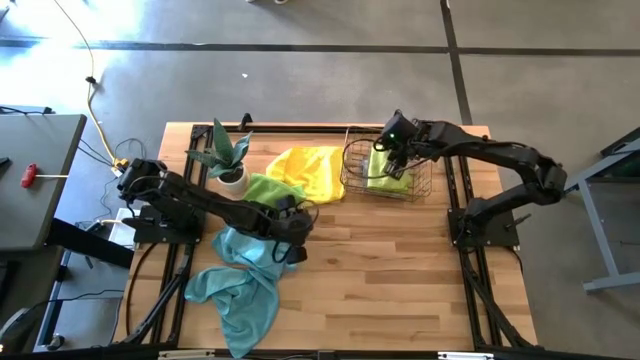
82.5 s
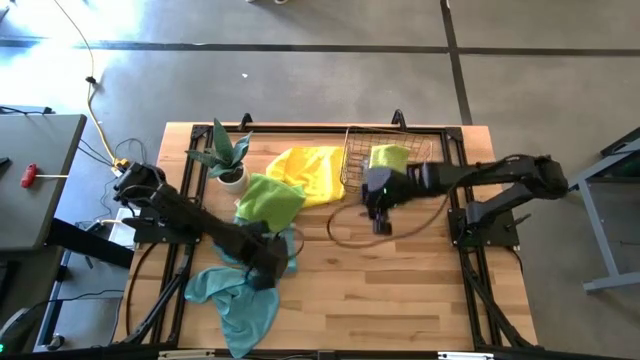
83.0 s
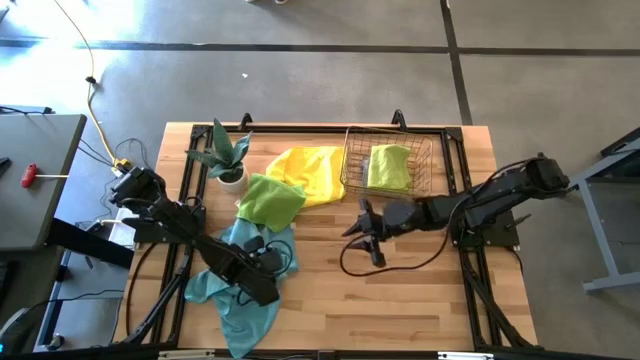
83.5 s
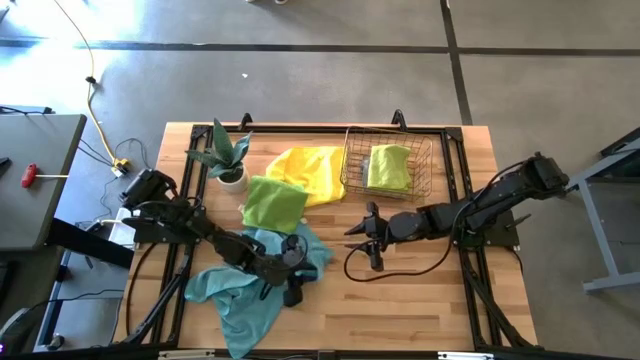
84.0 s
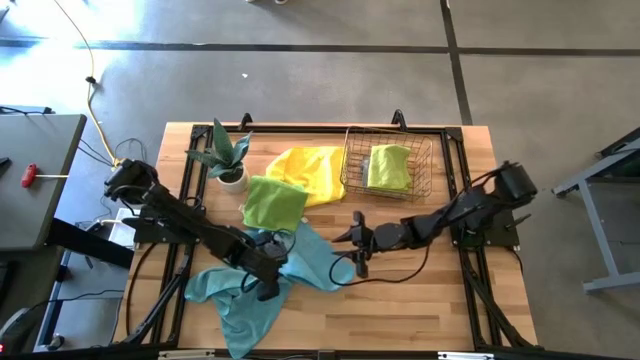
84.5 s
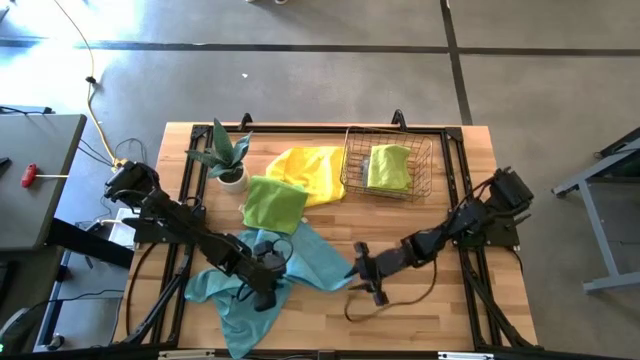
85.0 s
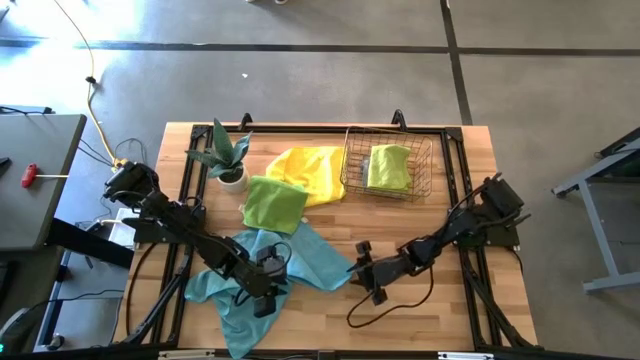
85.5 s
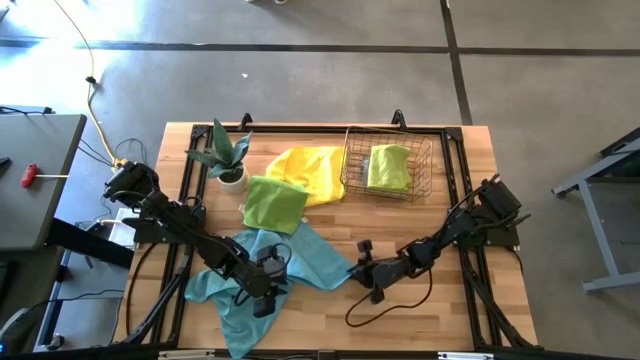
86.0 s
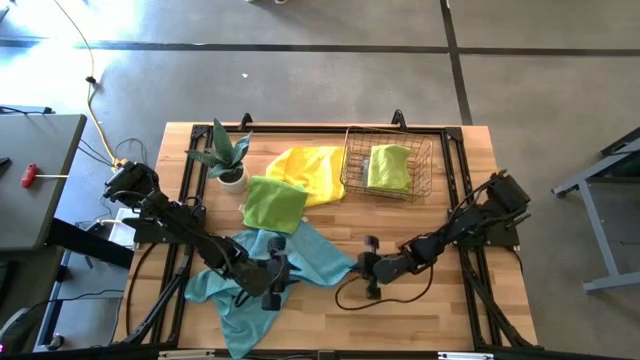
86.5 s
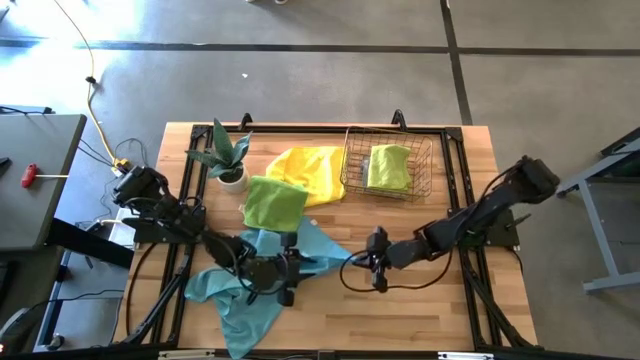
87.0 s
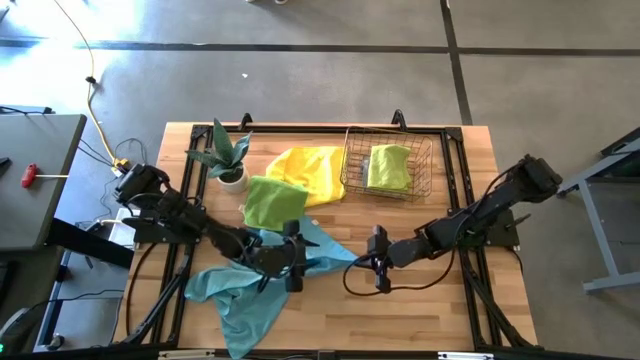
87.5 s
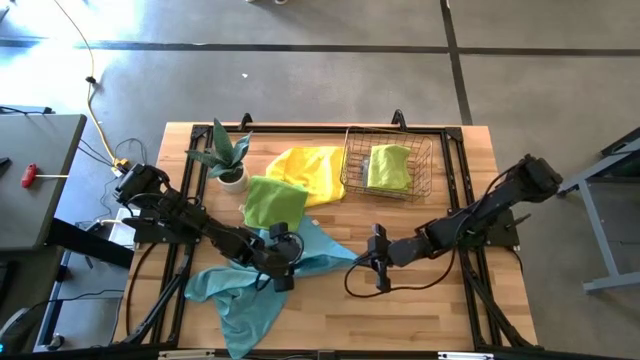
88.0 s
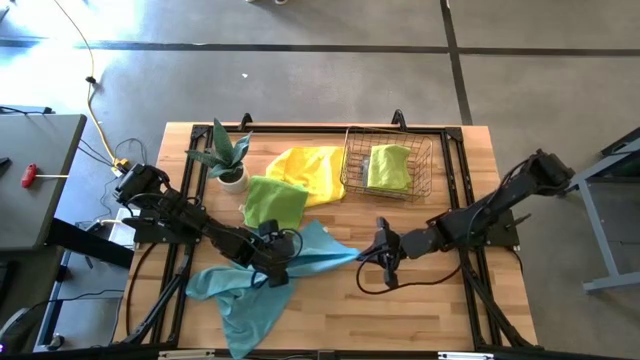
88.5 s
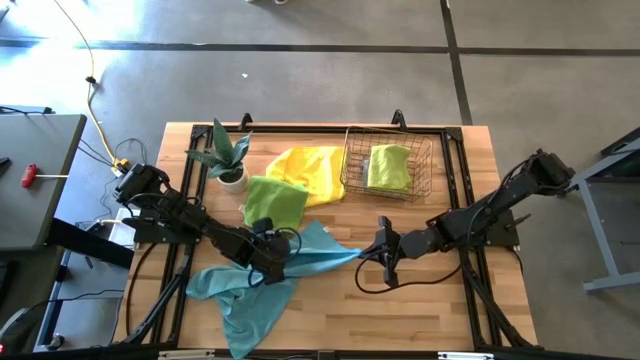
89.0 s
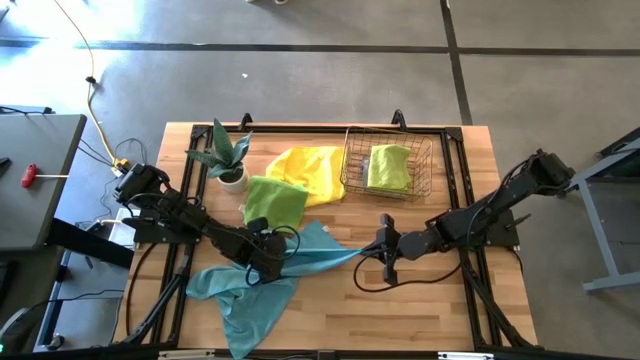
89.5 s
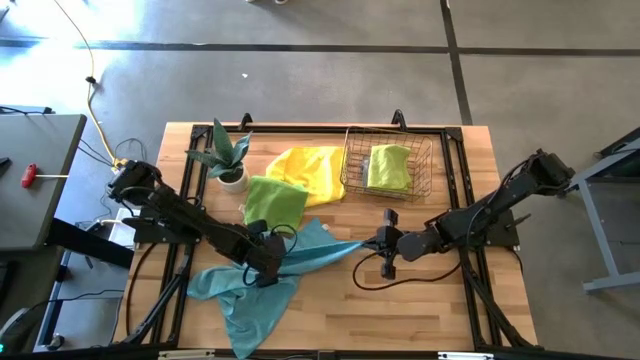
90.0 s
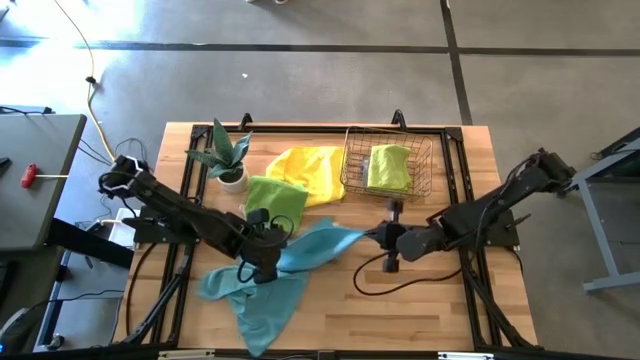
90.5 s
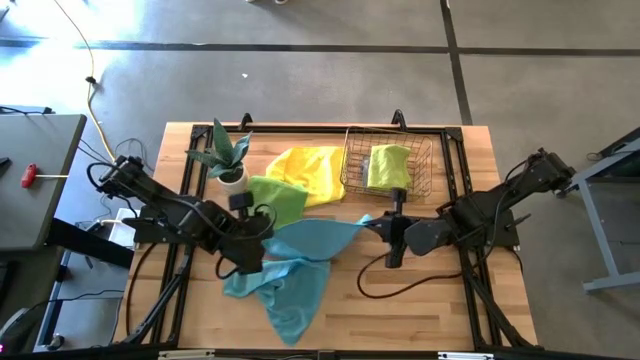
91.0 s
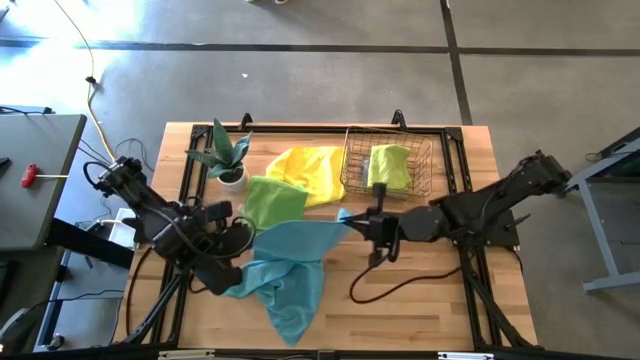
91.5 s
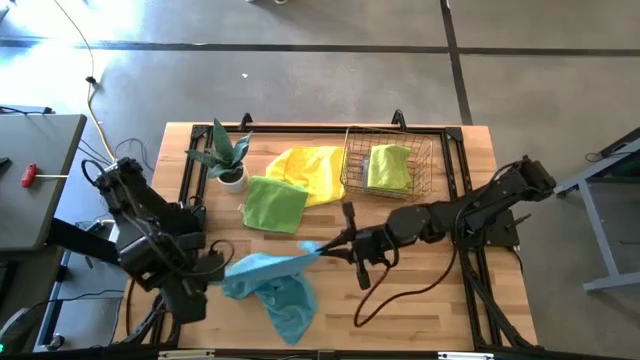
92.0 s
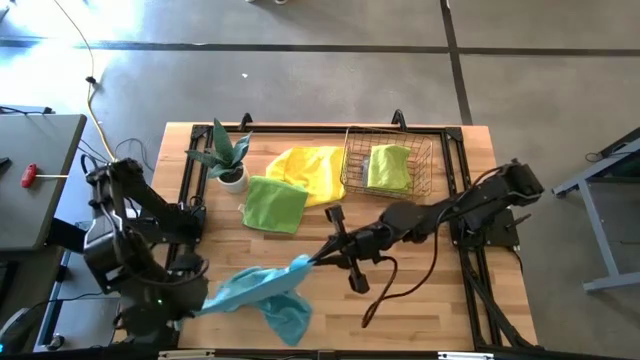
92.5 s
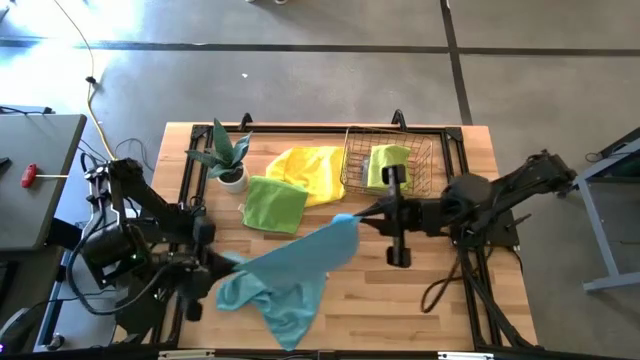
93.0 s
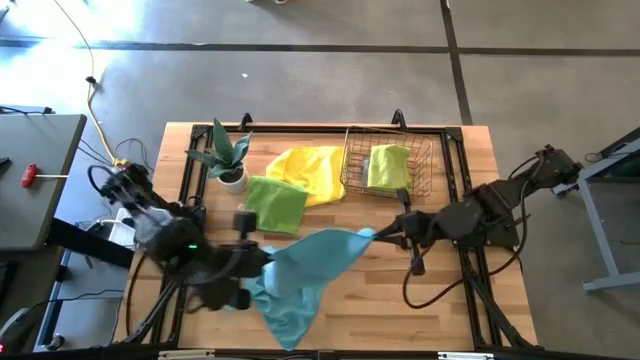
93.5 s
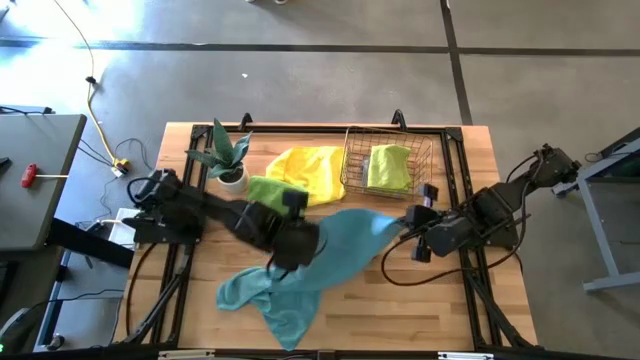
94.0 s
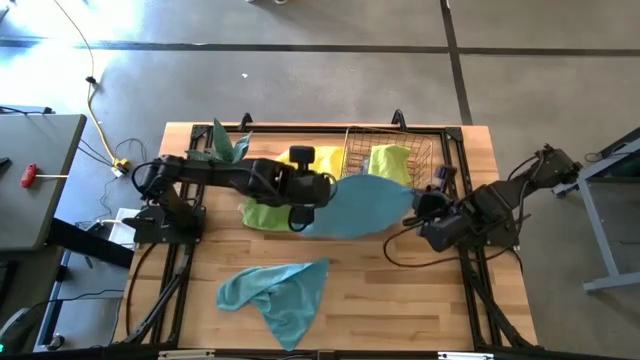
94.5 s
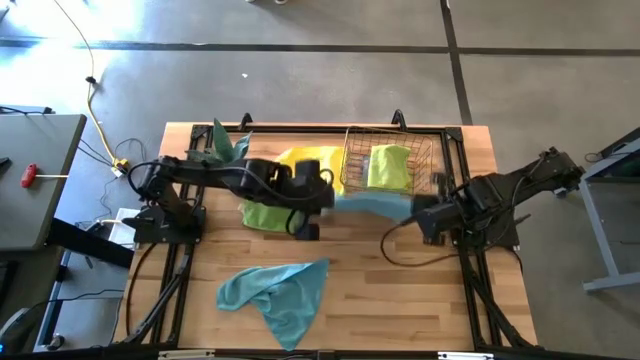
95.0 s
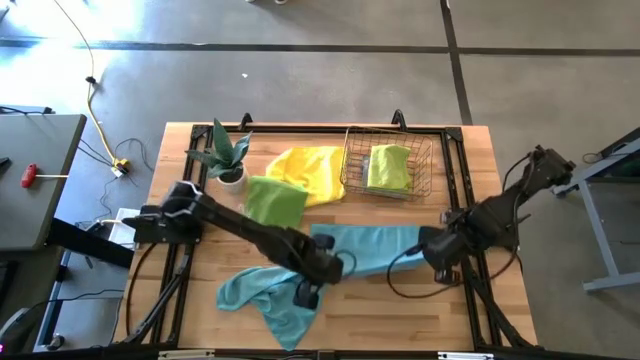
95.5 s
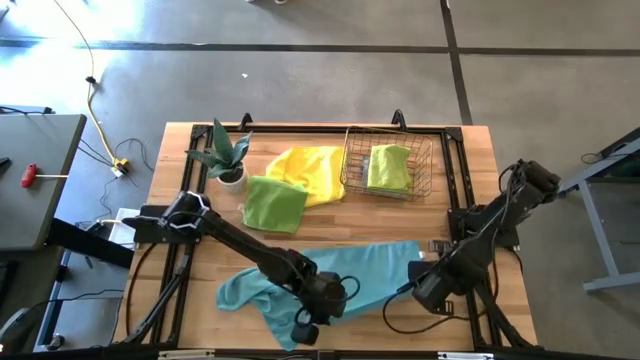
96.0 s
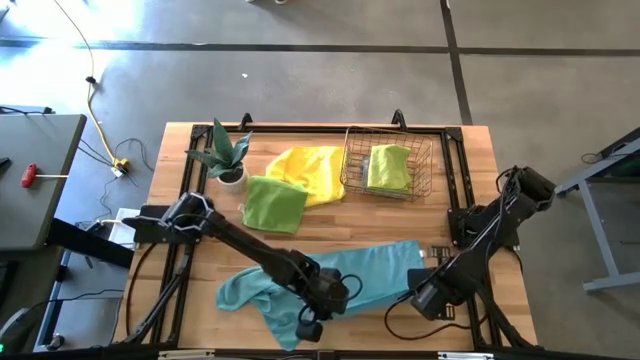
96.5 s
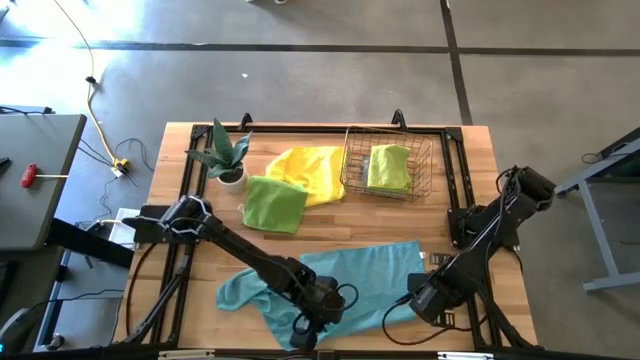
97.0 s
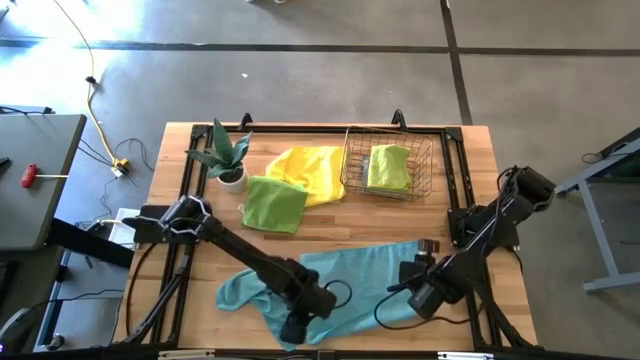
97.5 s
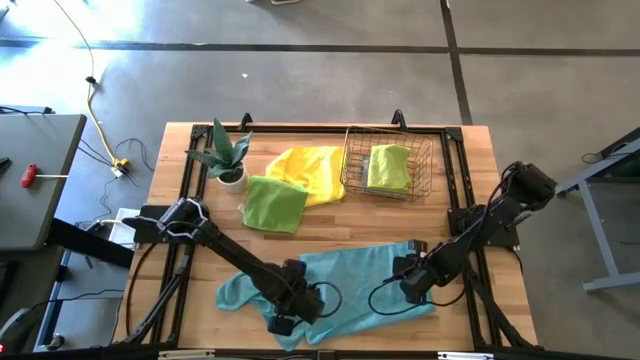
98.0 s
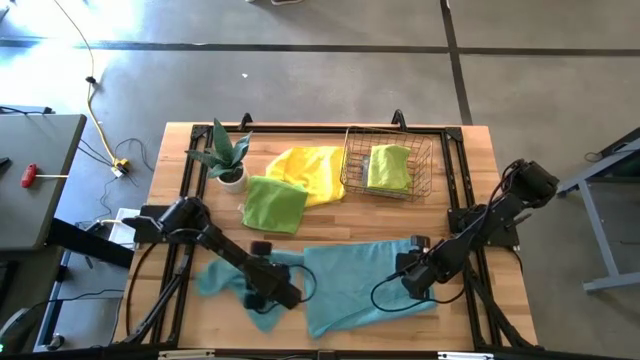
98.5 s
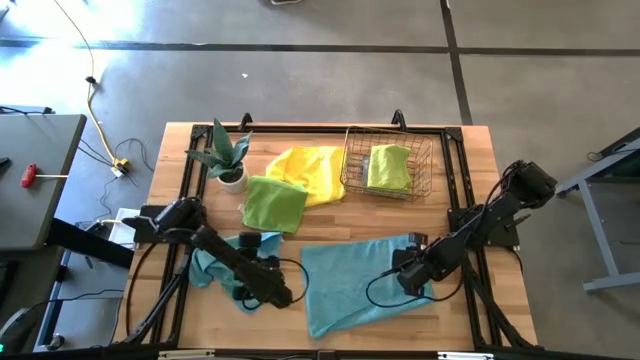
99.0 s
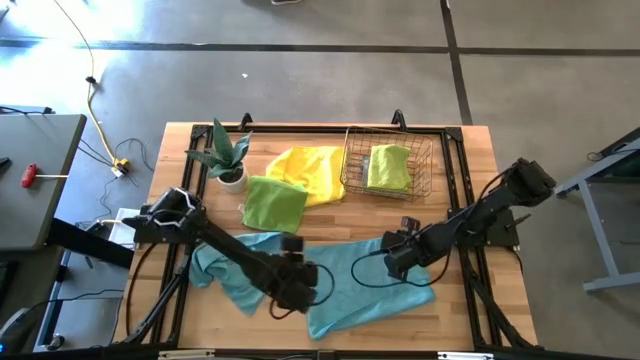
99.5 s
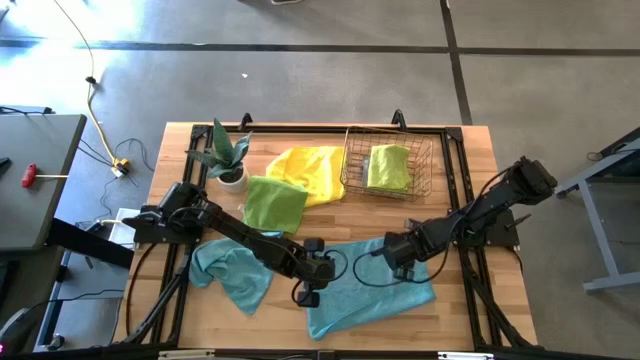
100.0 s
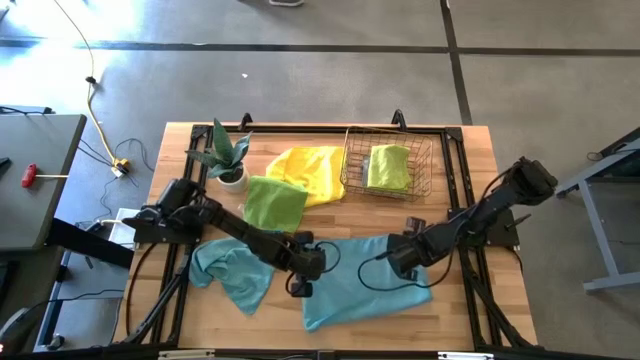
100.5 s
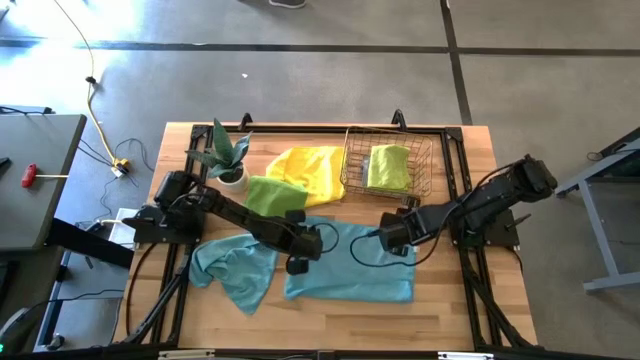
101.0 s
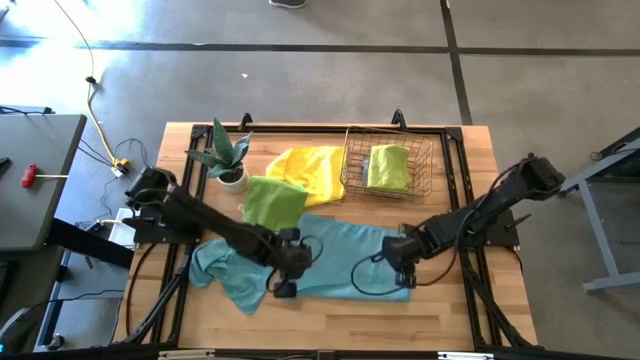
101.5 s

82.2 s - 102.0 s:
Task: Fold microfiber towels
Fold the right blue microfiber towel
